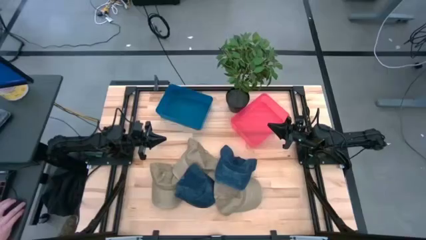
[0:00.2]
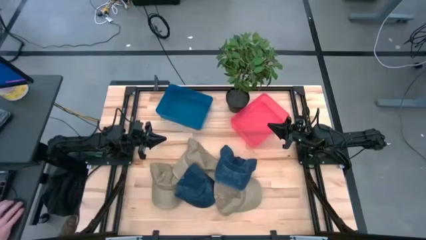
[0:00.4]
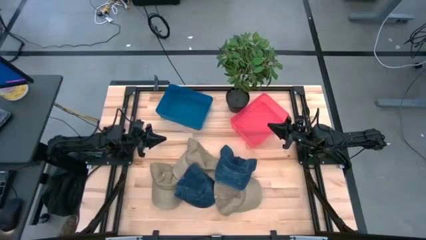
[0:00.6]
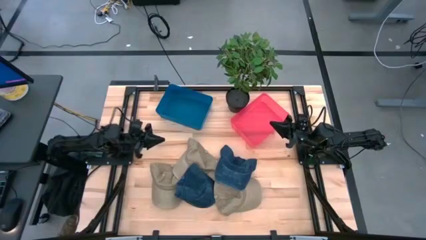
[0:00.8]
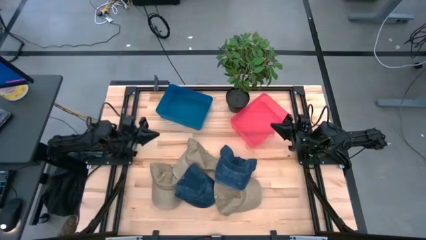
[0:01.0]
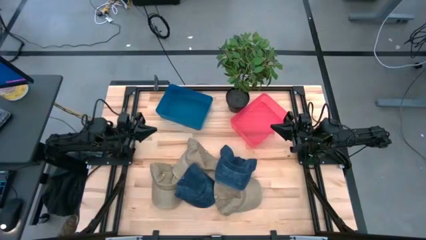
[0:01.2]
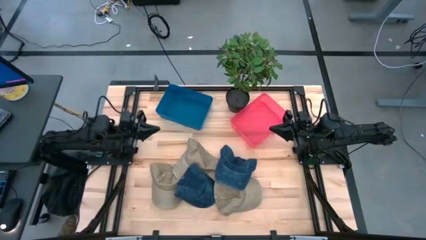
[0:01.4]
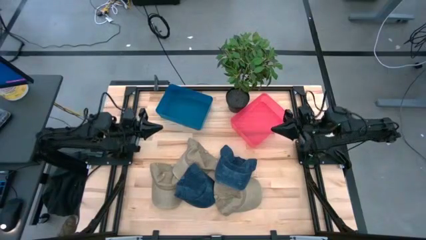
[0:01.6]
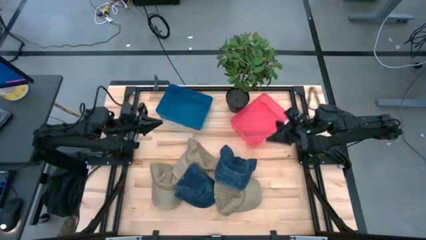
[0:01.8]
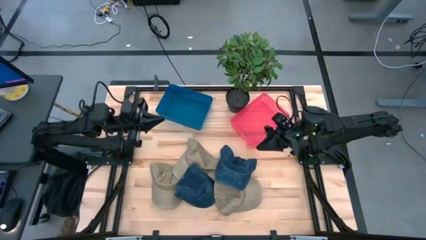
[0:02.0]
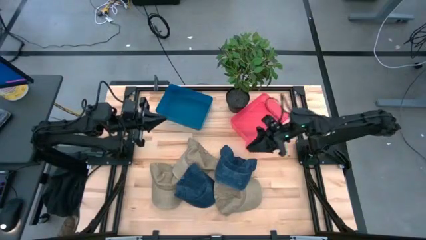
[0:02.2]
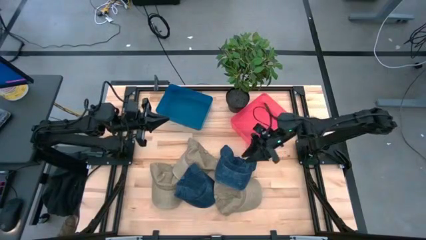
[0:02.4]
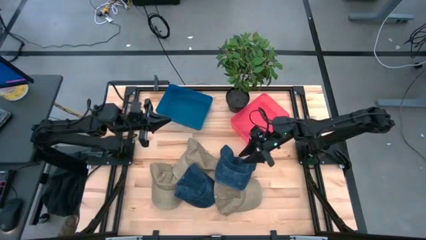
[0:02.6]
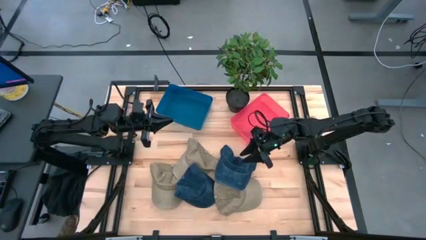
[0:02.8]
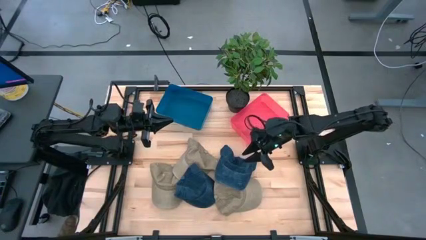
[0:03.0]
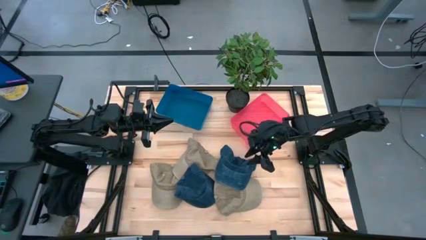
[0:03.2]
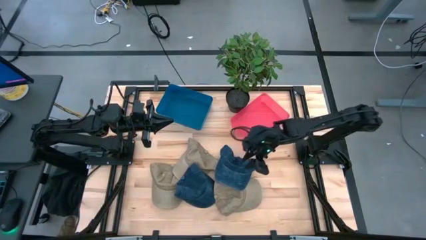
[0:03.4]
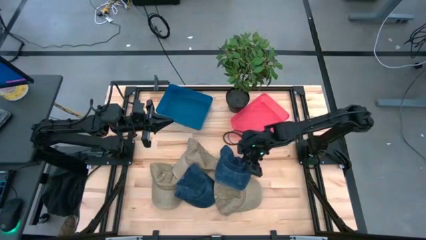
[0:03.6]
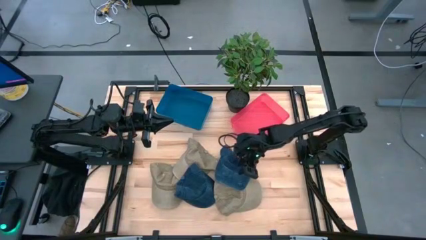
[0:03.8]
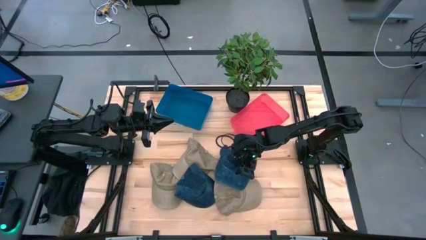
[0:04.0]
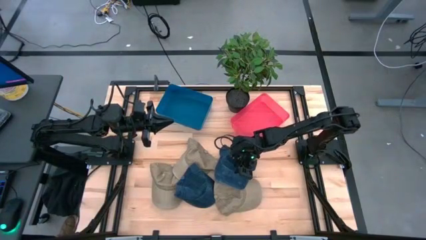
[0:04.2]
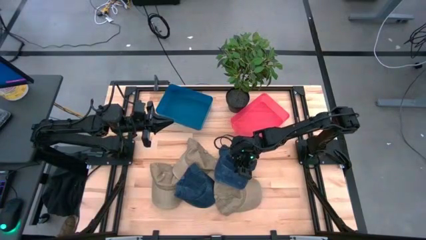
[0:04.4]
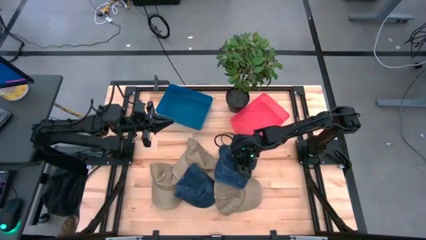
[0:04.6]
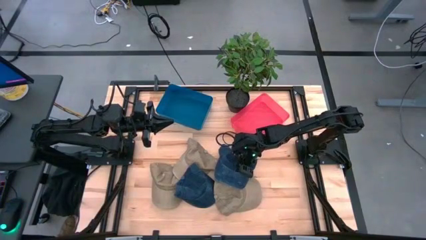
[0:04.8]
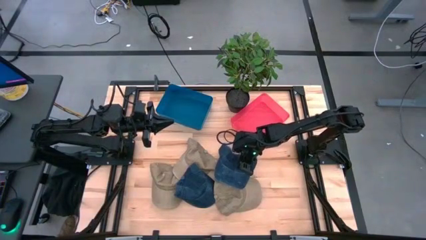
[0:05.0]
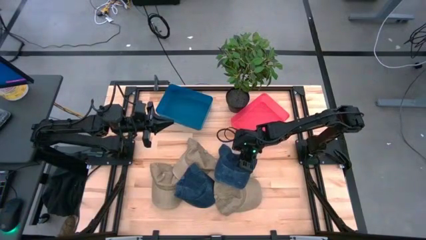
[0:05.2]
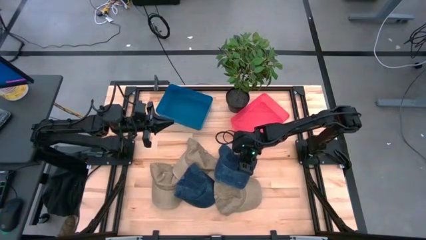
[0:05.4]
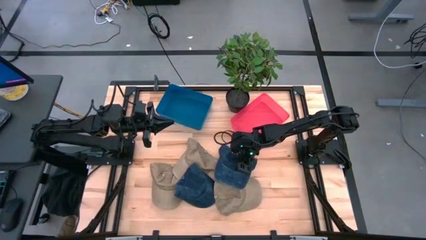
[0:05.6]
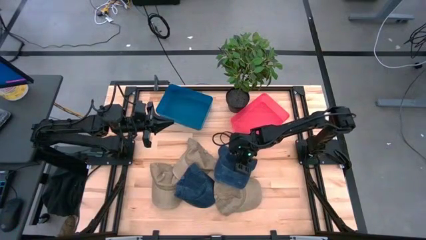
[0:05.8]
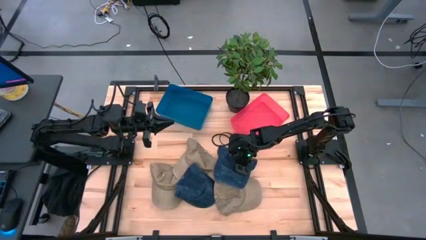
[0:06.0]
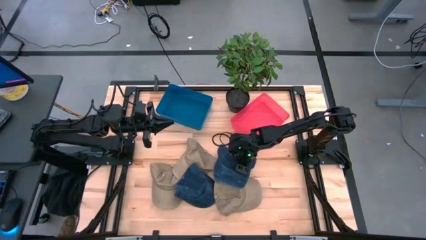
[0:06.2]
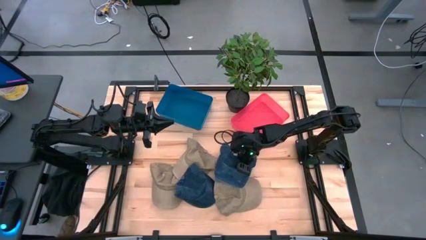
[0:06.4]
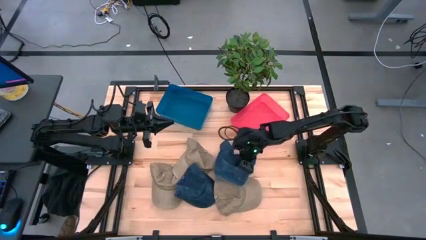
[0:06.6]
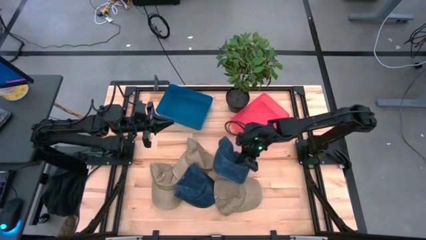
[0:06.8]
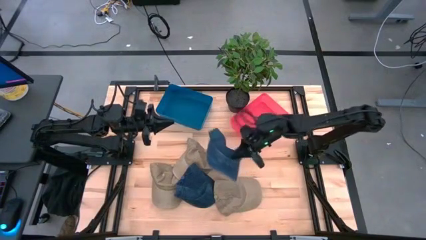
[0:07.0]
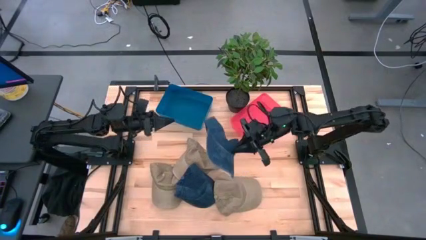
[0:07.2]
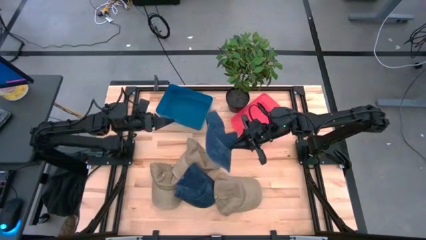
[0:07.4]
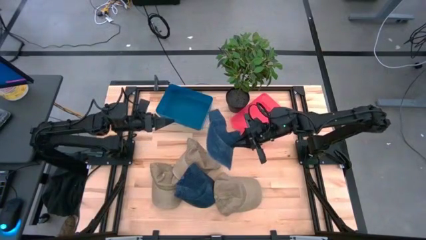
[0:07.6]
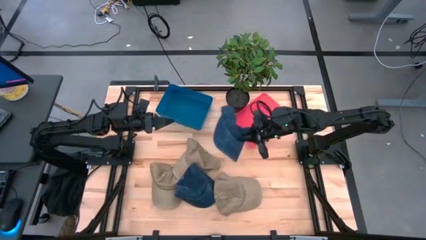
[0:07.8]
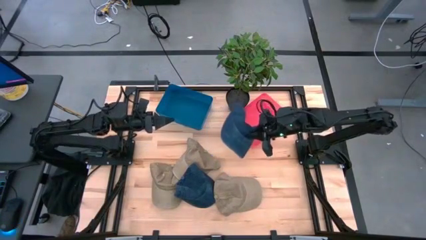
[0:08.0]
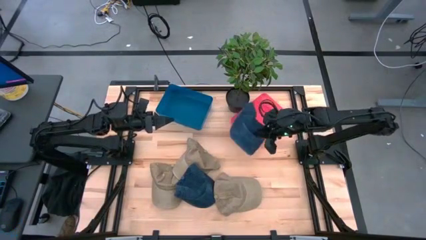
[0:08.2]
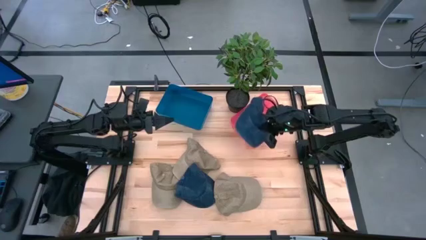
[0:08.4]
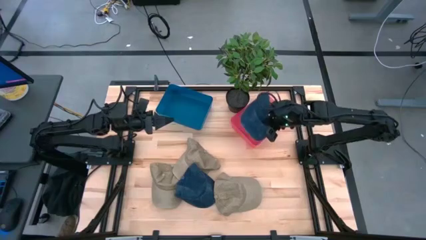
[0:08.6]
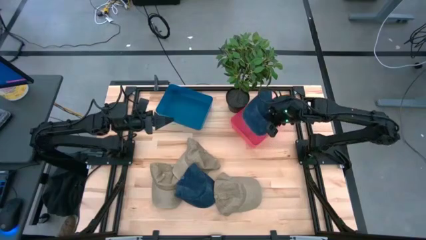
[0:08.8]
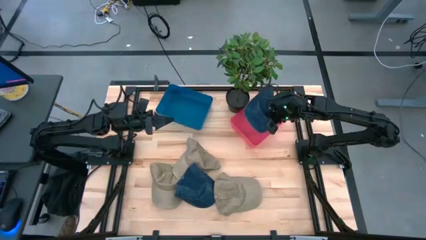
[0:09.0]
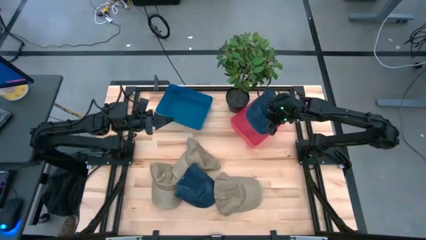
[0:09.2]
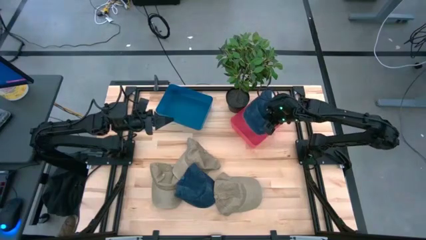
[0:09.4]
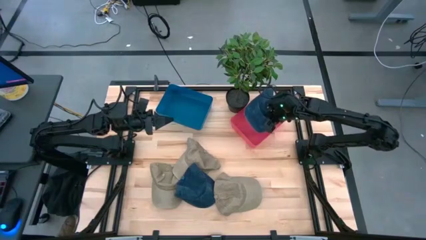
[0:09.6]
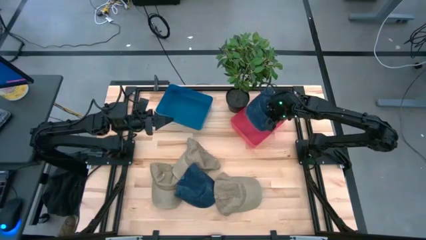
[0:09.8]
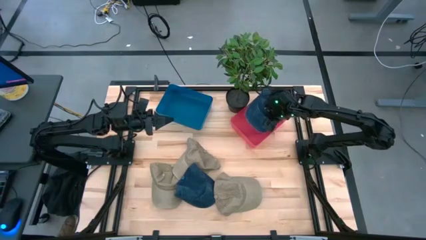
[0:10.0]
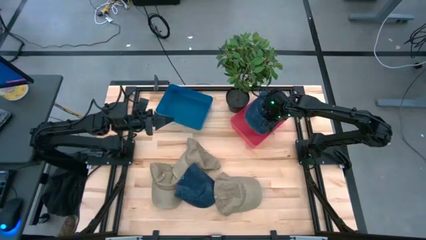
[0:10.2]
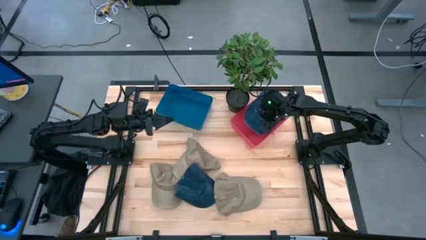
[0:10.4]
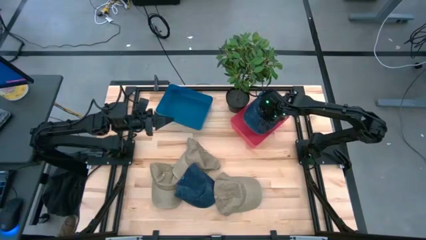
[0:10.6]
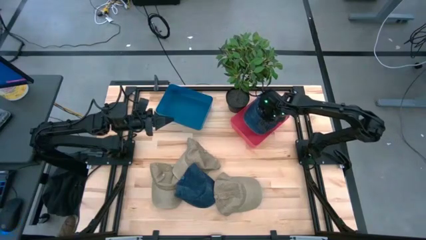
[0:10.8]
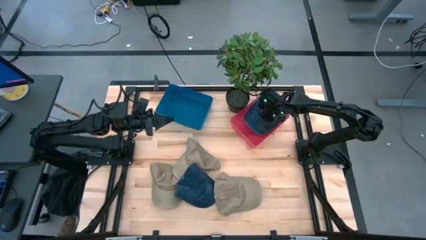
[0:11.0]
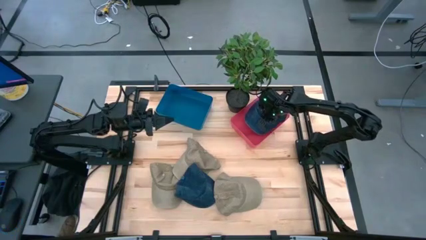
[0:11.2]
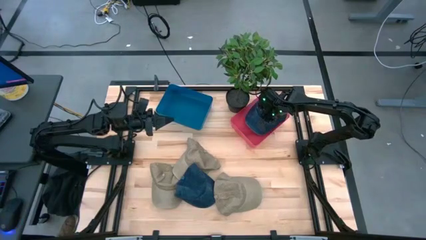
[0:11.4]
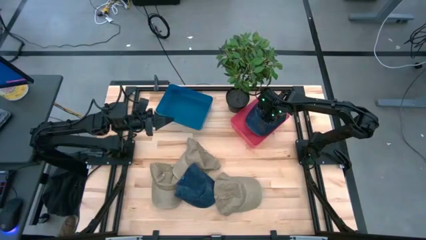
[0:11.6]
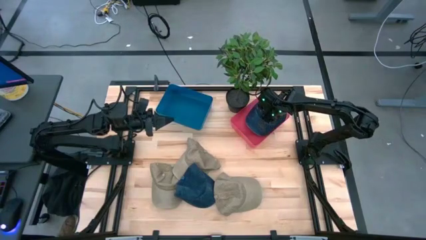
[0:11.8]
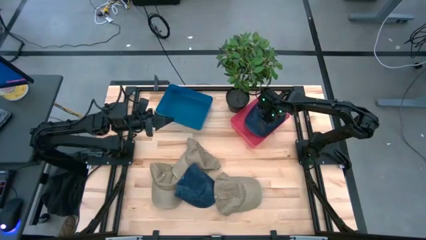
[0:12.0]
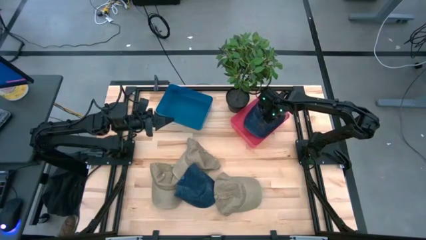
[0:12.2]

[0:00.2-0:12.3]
Task: Pick & Place hat
Put the right blue cap into the red bin
